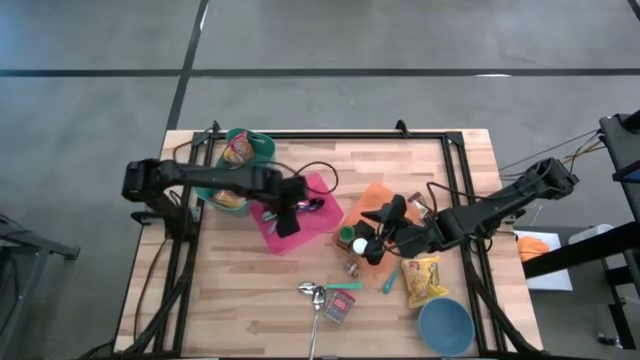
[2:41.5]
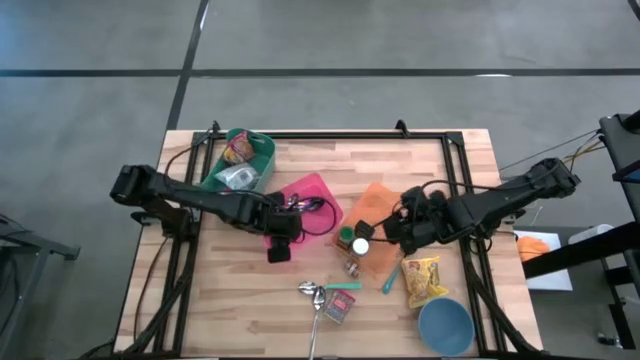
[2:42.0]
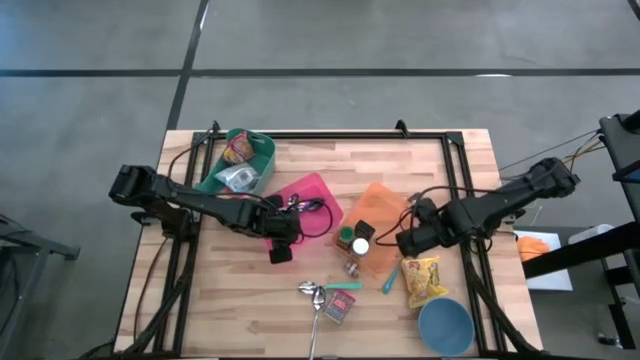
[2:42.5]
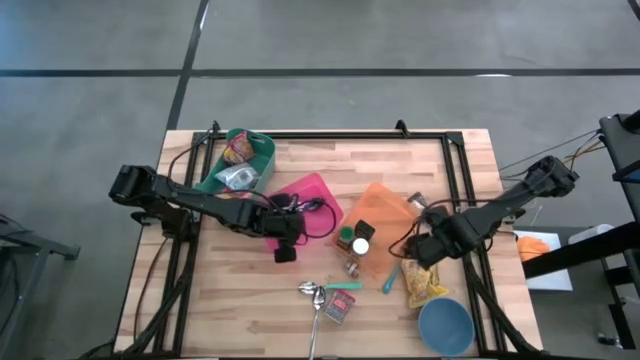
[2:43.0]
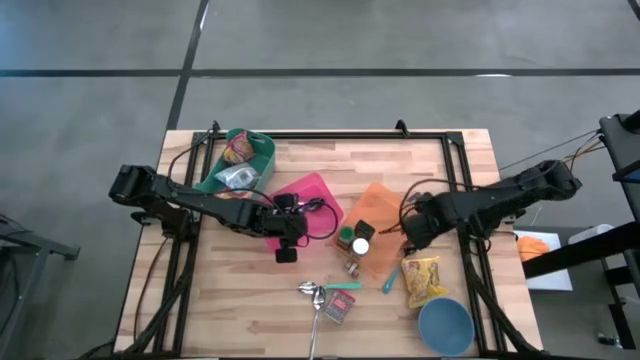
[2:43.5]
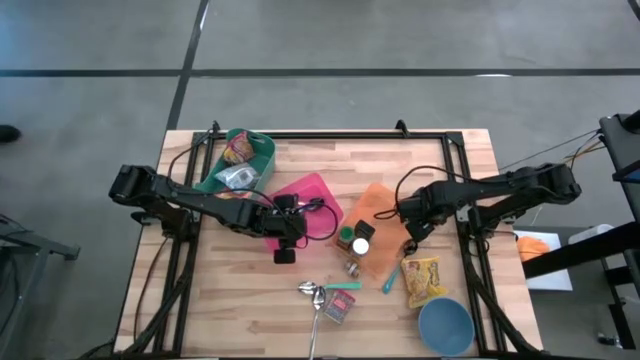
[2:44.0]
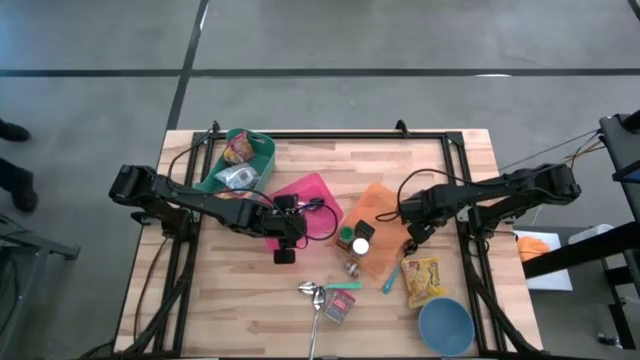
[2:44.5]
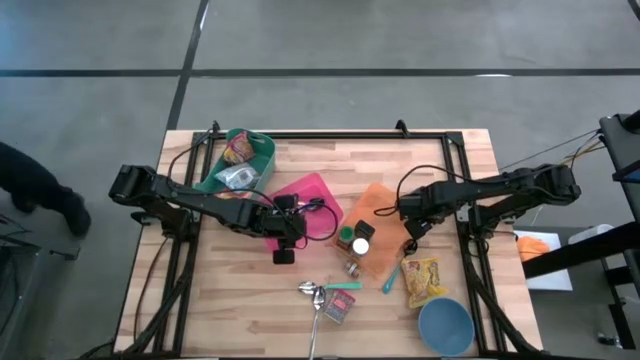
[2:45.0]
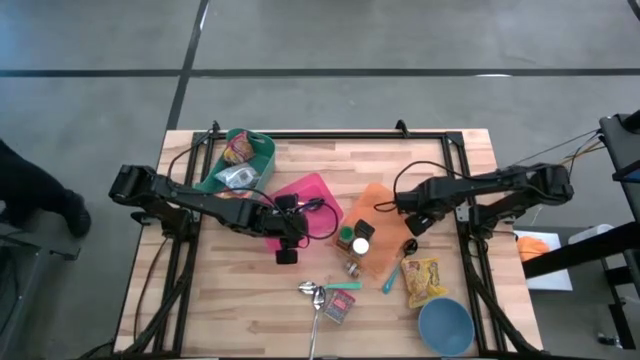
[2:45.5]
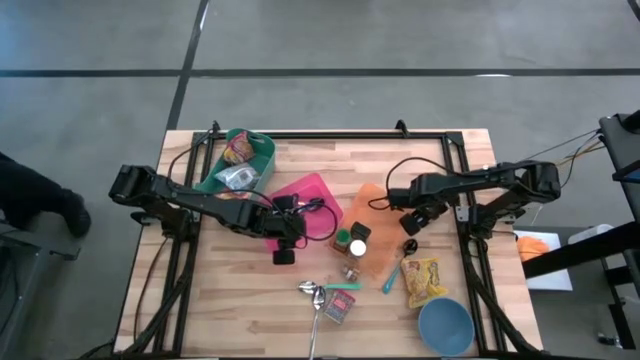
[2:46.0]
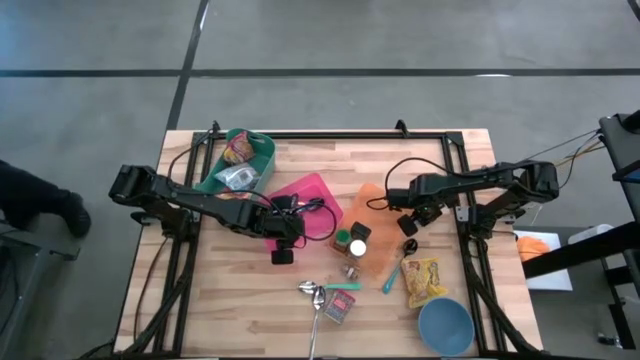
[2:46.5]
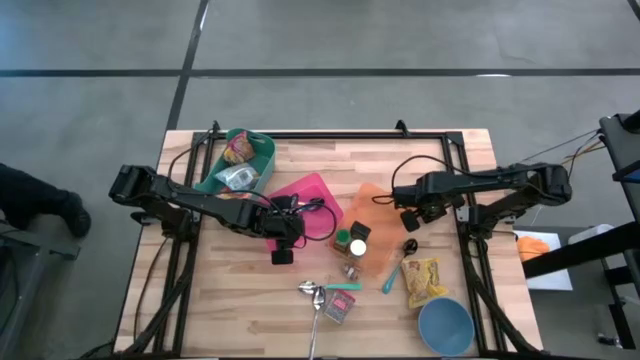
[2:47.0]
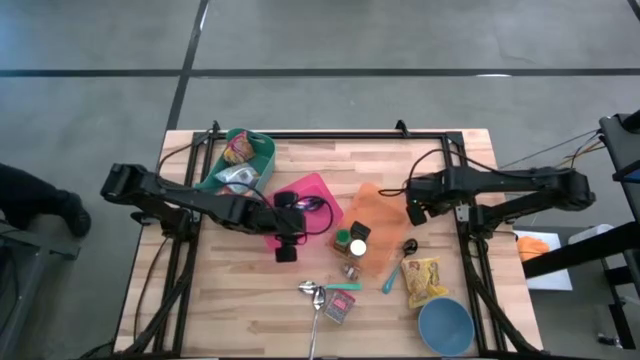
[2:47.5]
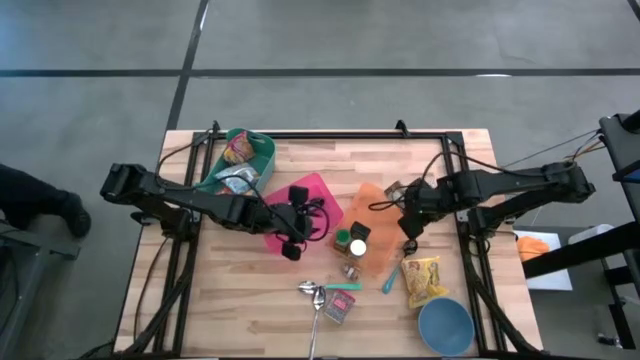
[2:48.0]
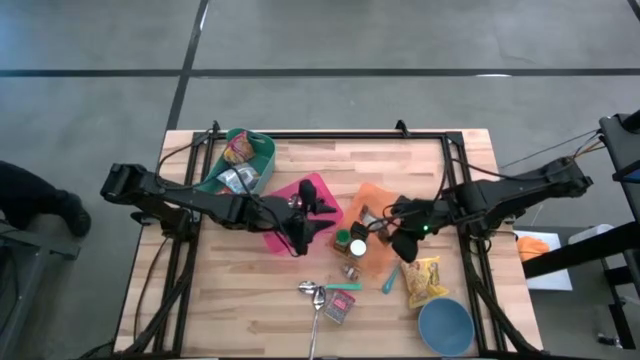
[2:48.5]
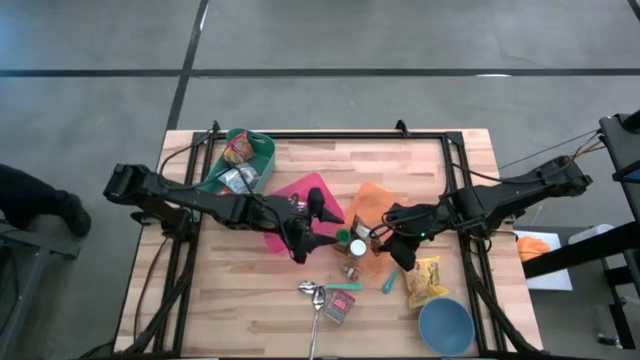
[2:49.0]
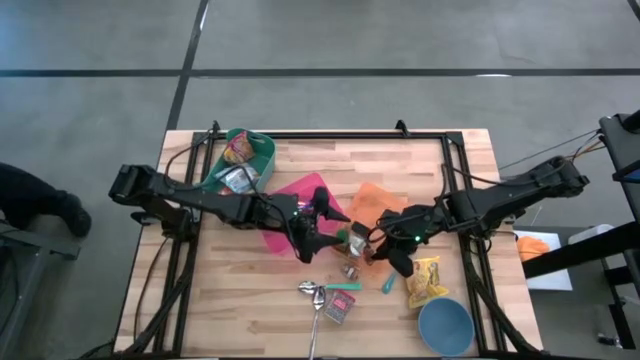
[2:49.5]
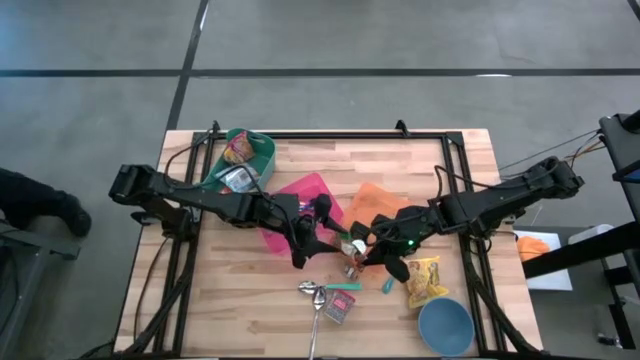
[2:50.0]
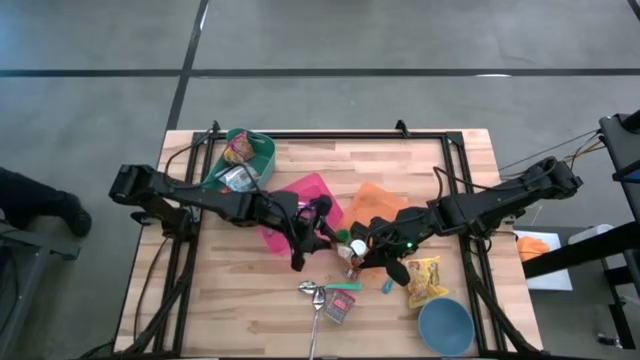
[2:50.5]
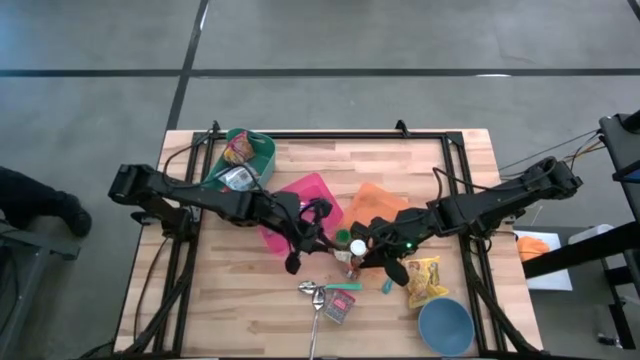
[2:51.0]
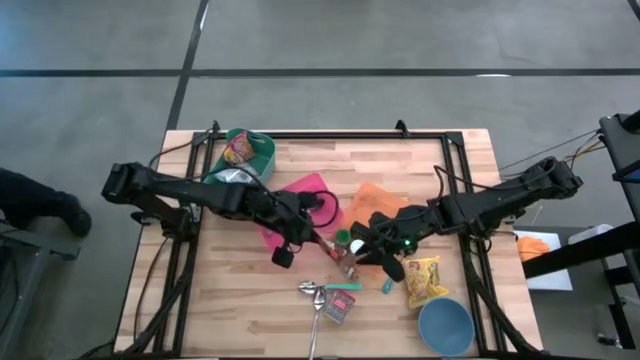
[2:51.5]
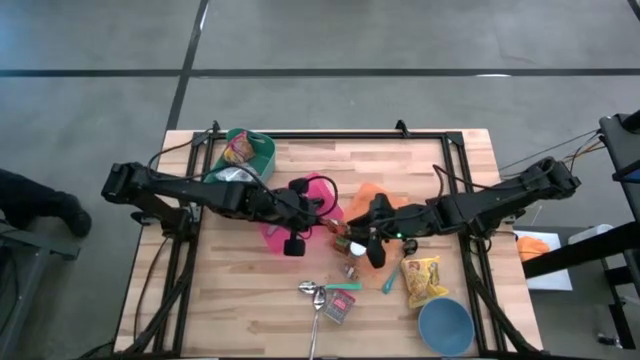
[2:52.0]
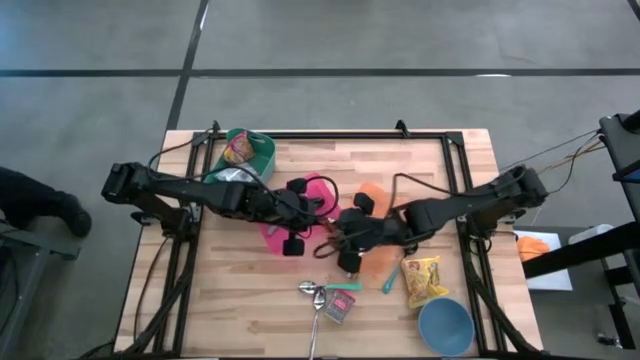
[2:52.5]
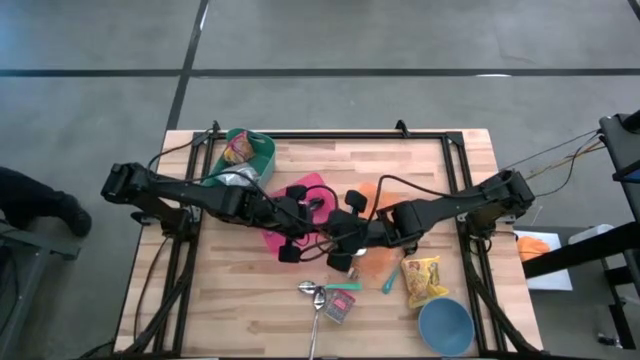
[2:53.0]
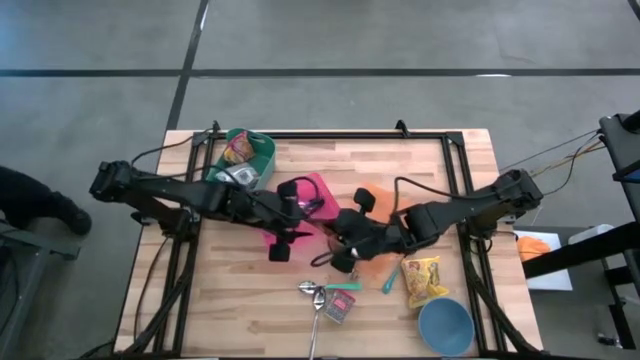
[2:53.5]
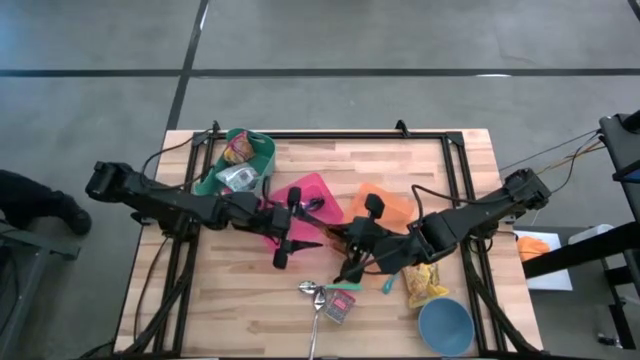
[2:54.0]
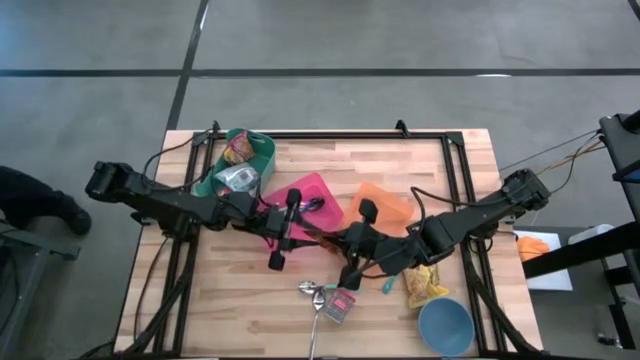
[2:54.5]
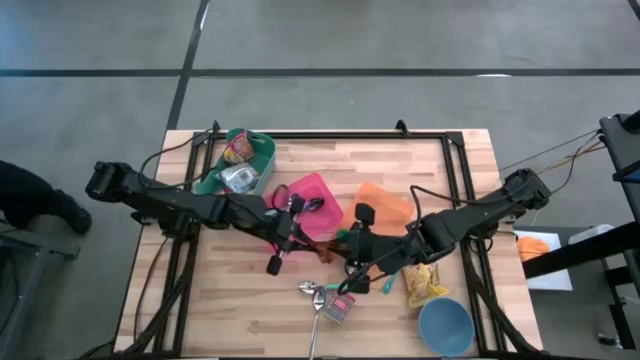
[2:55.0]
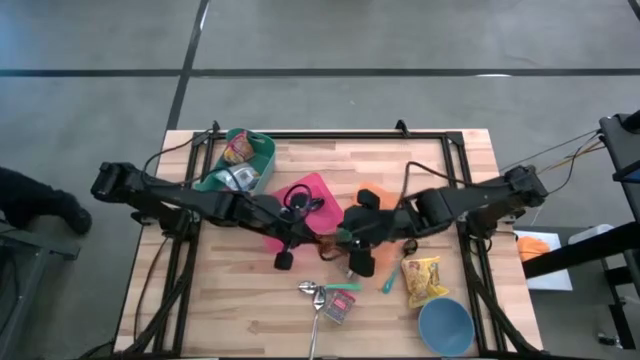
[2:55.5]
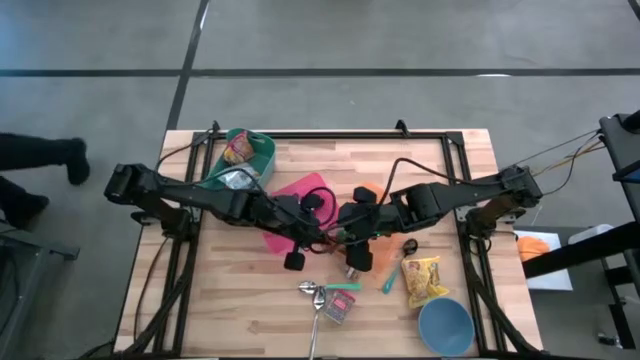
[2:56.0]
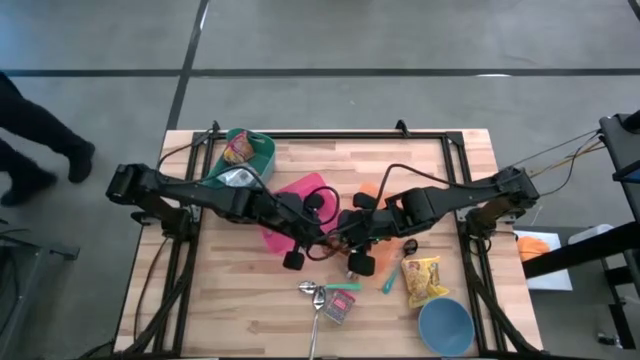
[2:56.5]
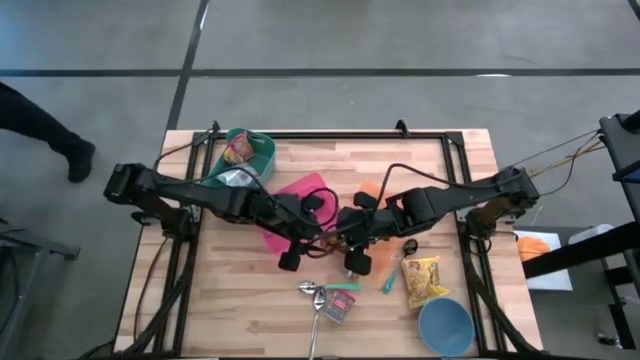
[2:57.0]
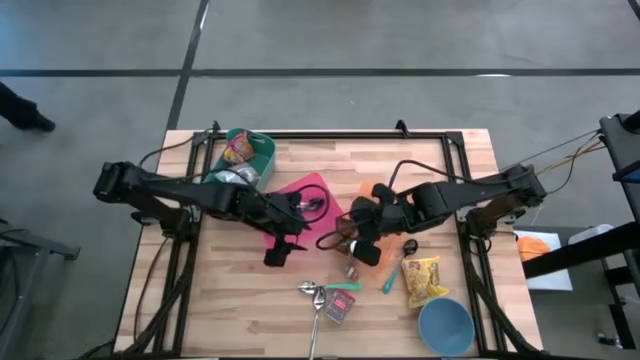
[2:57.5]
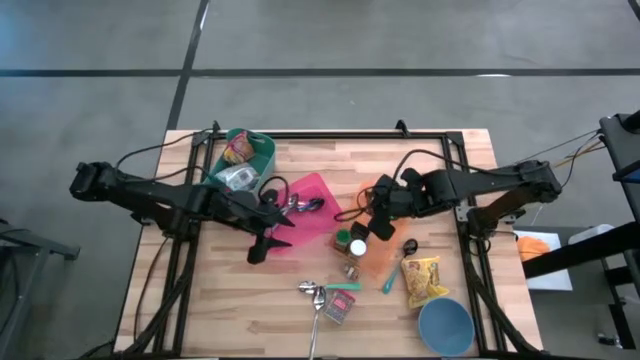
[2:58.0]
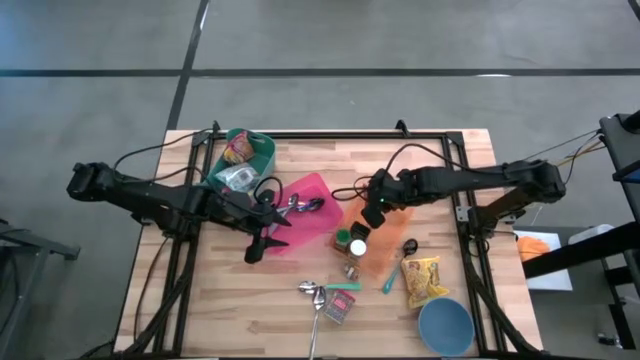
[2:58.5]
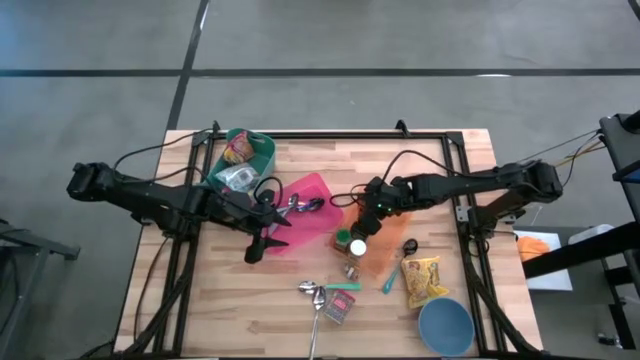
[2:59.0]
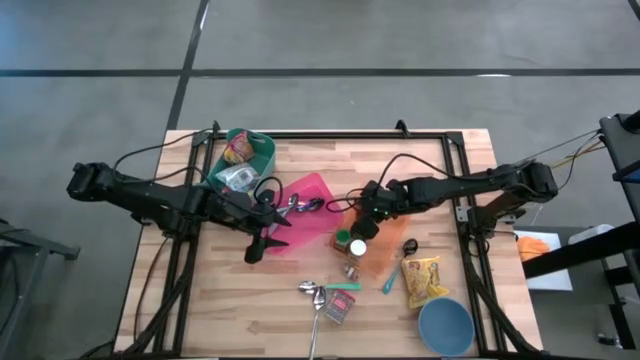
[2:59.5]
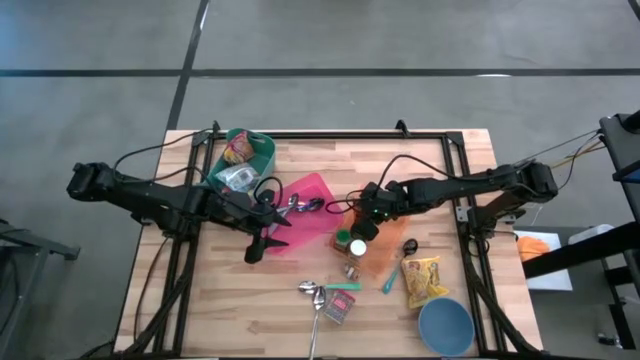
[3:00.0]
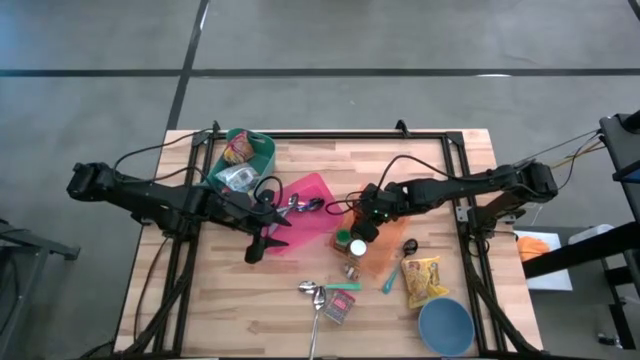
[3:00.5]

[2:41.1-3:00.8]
Put the orange seasoning pack into the orange bin

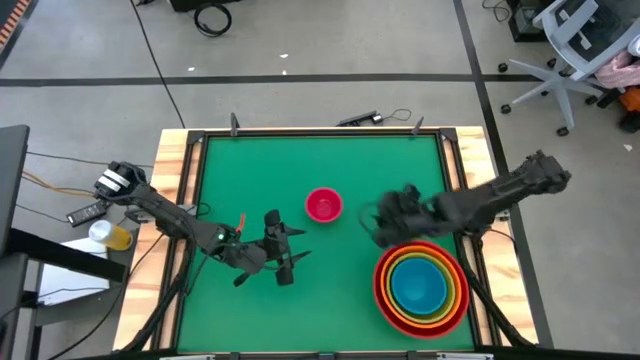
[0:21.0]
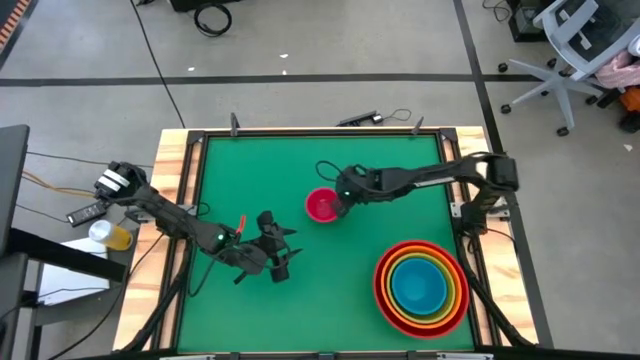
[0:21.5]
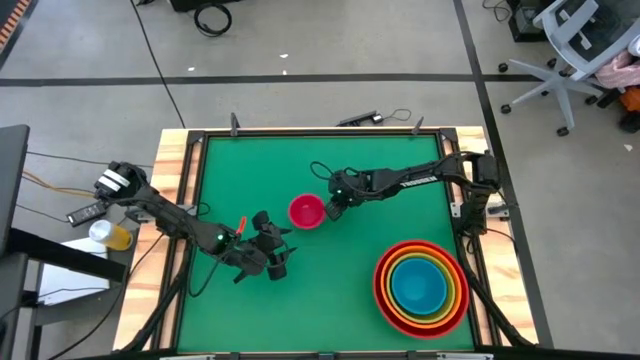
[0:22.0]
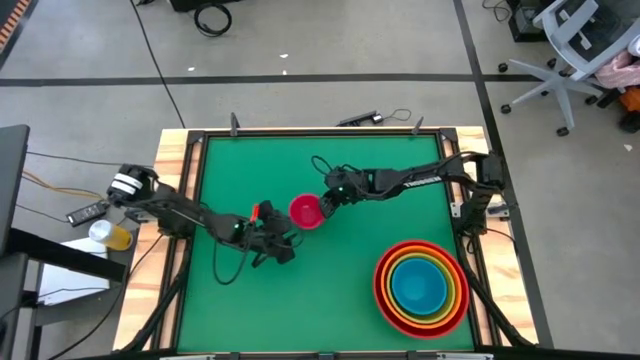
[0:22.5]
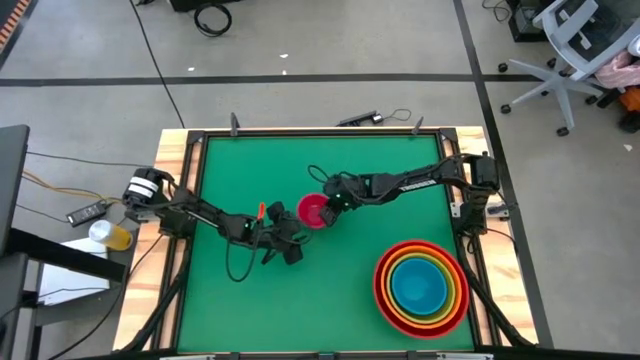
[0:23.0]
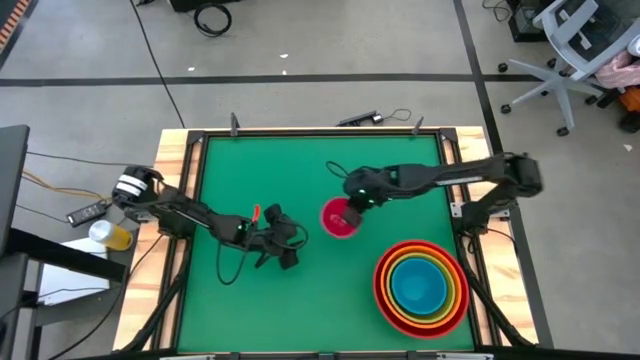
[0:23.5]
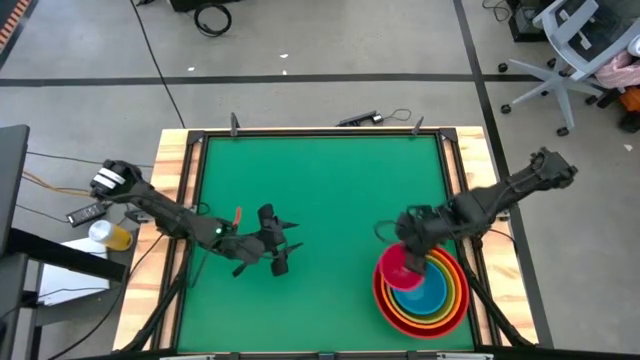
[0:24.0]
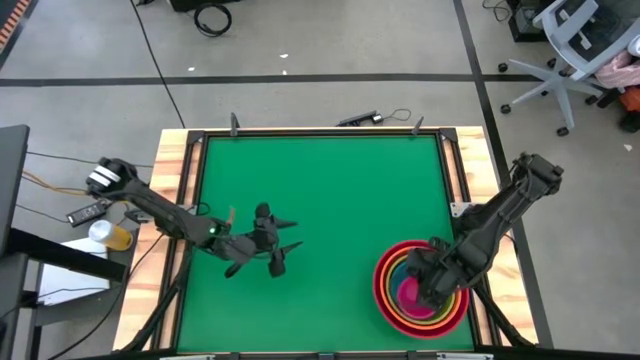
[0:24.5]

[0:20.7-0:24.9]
Stack the pink bowl on top of the blue bowl
